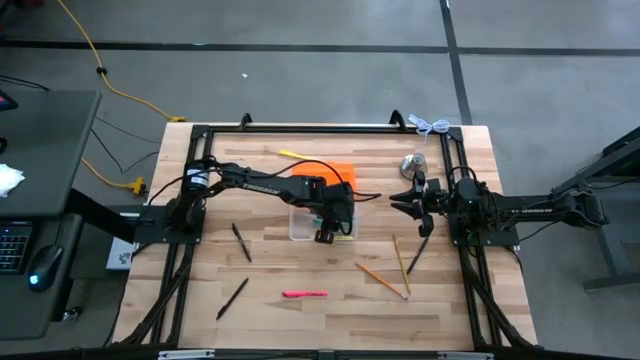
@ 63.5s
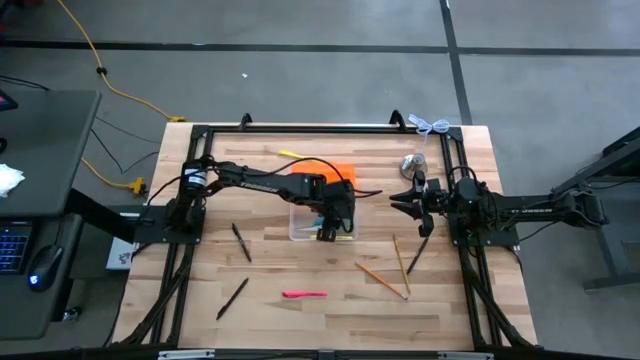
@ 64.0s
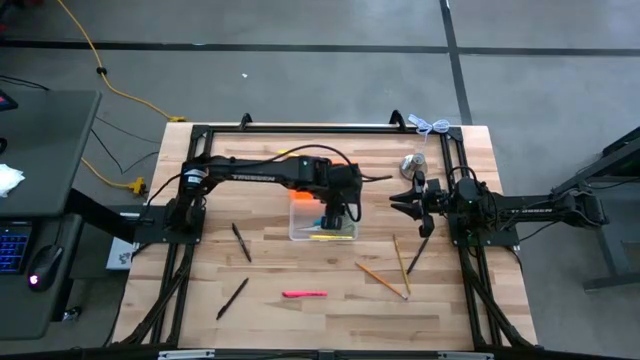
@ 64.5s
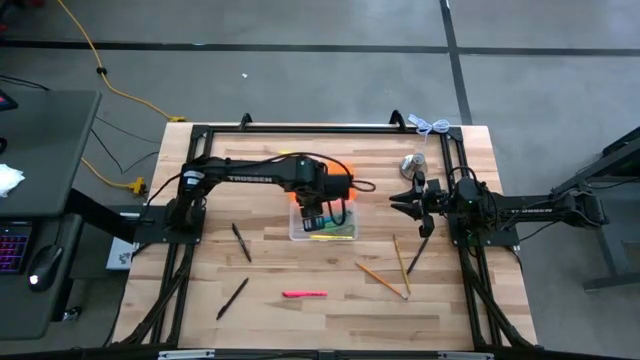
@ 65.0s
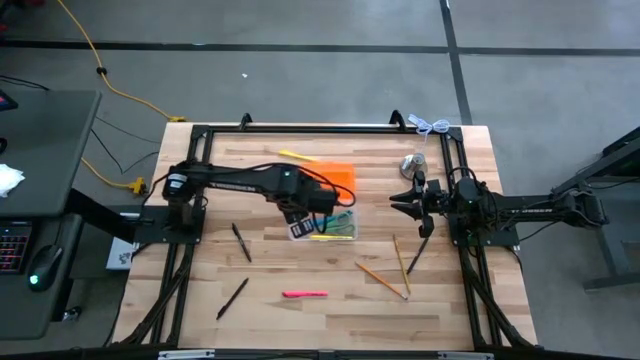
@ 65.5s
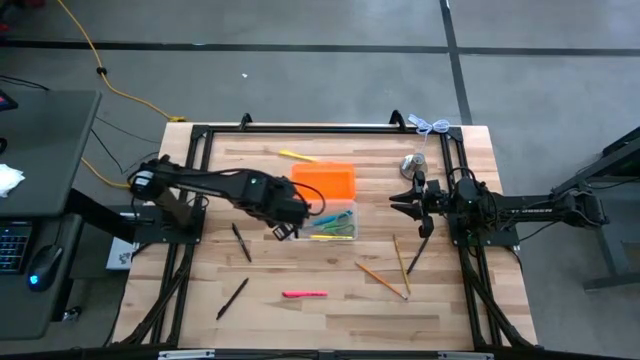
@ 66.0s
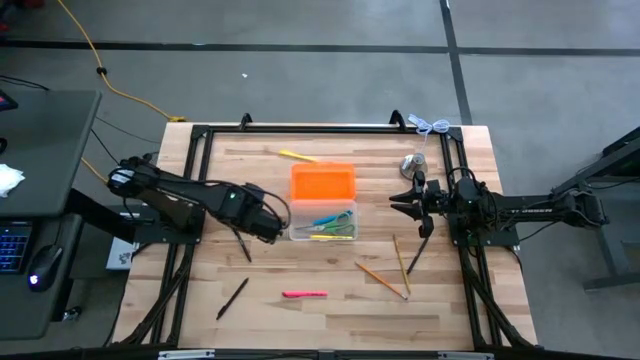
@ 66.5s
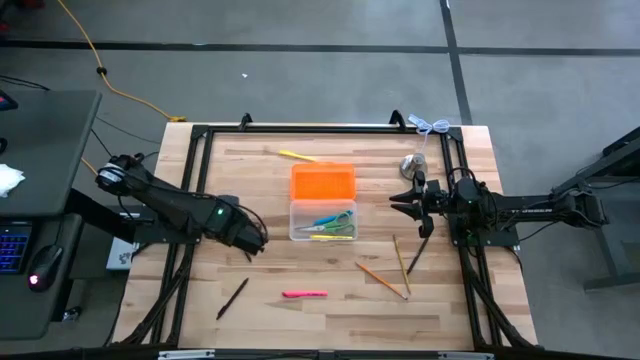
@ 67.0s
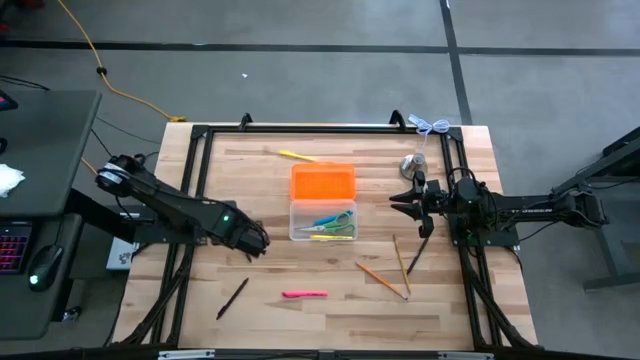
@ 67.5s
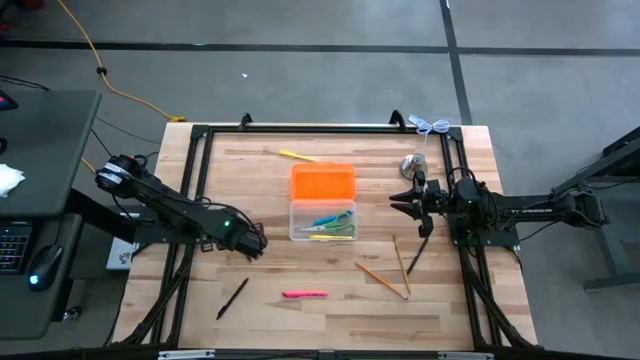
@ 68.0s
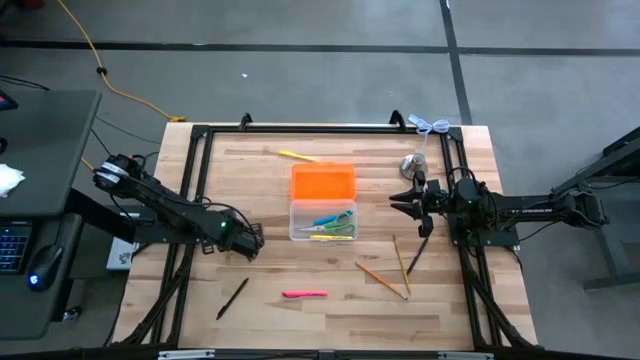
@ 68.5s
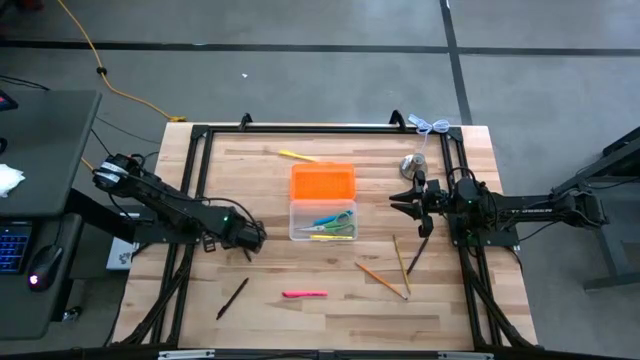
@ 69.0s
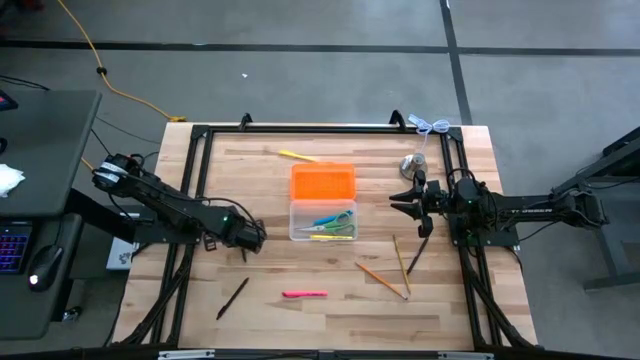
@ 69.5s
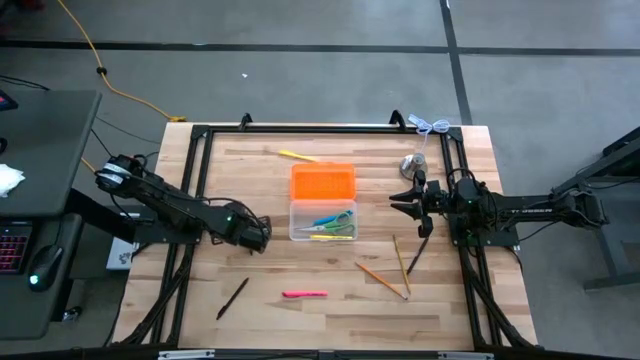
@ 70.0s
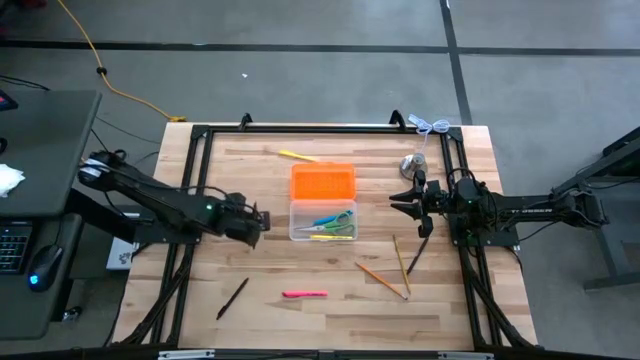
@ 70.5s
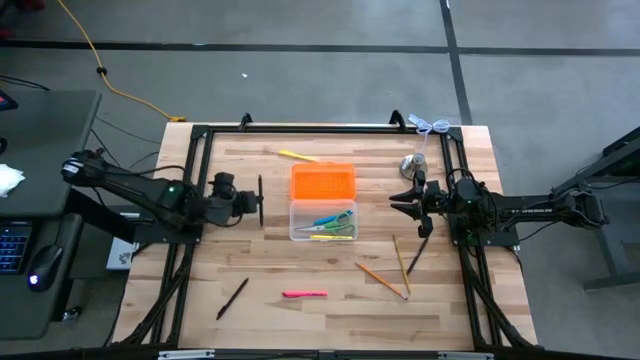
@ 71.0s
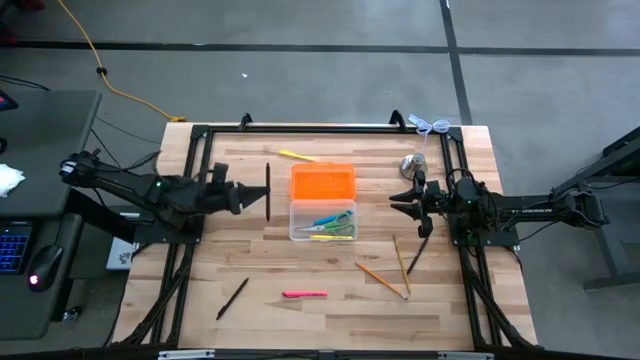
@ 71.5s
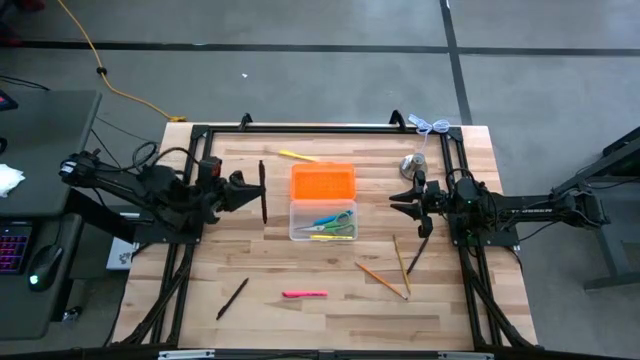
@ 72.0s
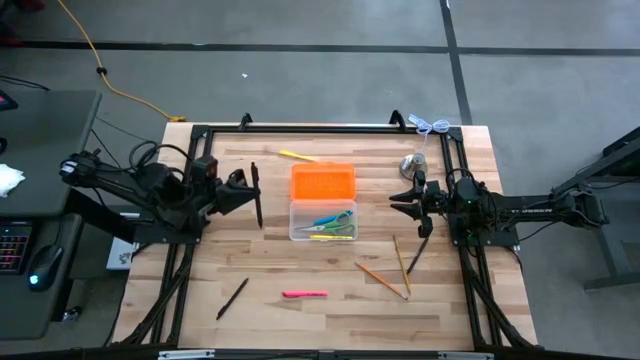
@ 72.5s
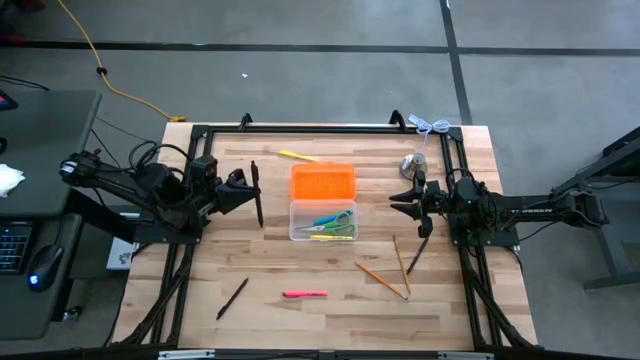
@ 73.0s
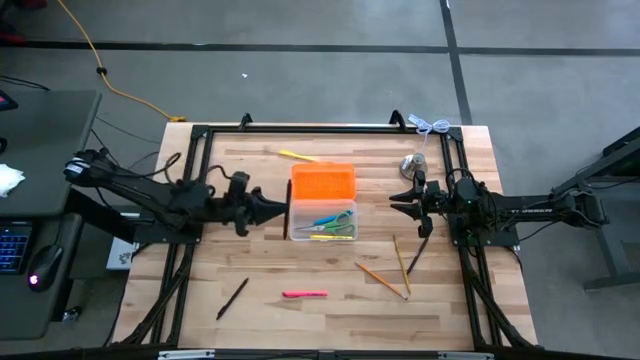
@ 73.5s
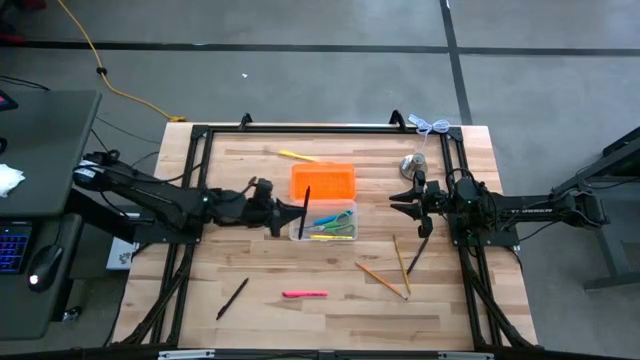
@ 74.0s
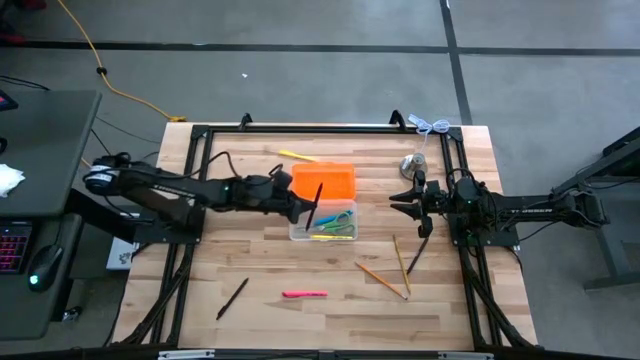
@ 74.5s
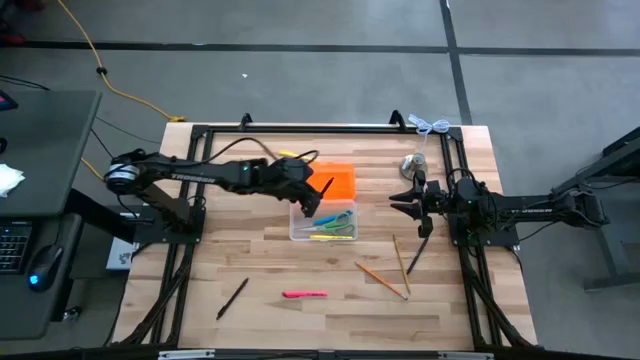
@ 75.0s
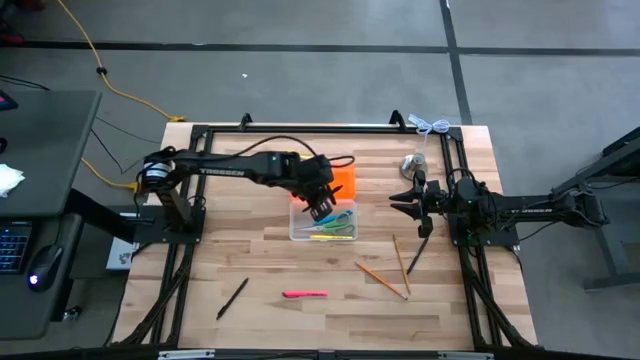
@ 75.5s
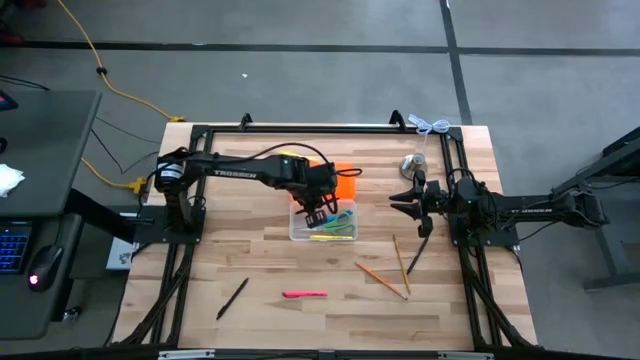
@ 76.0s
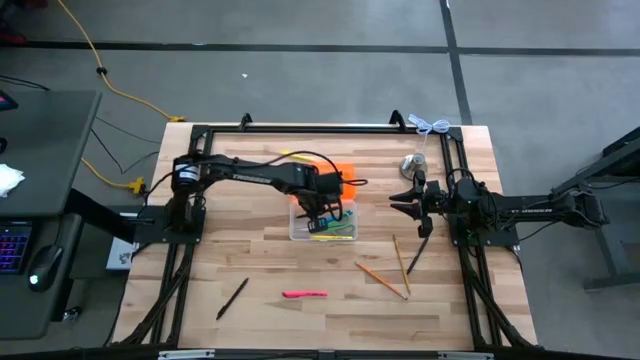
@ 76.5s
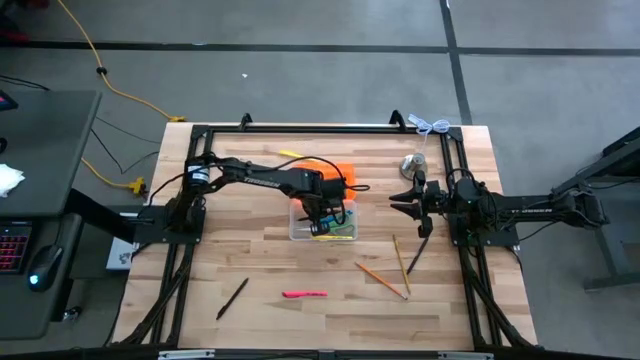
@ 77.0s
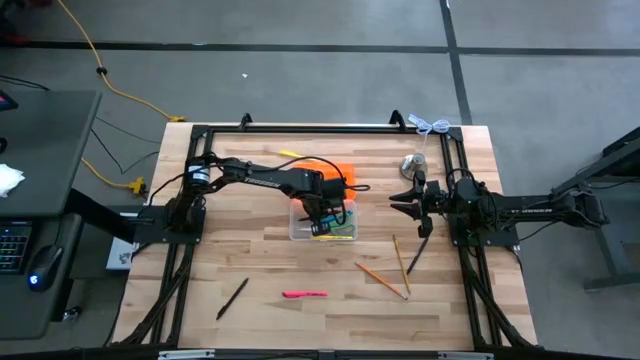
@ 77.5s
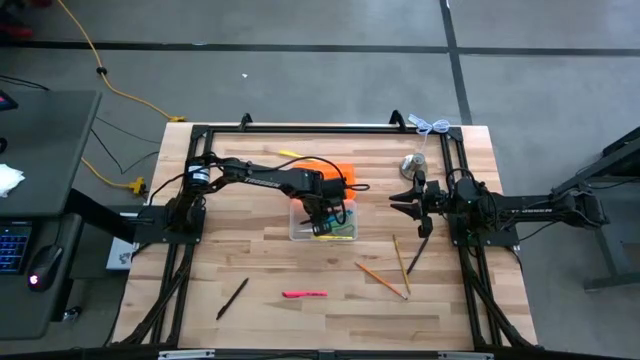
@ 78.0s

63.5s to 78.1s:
Task: Pick & place school supplies into a supply box
Put the top left black pen into the orange supply box

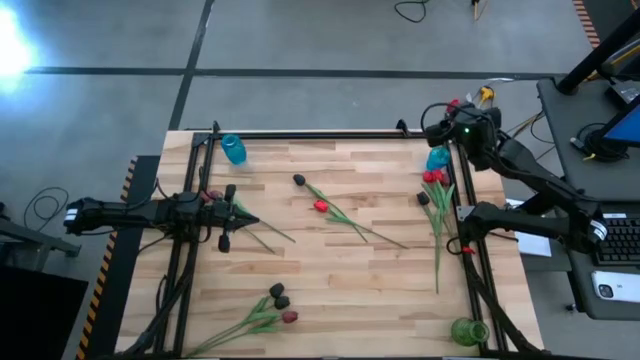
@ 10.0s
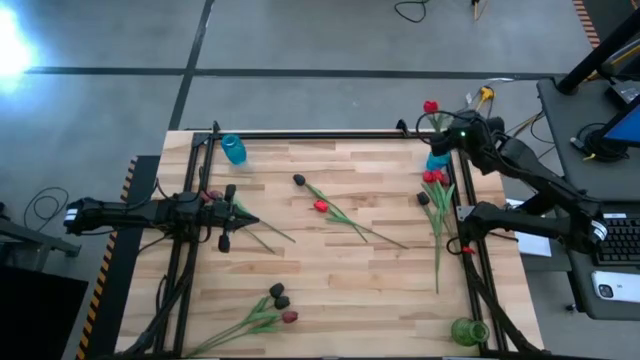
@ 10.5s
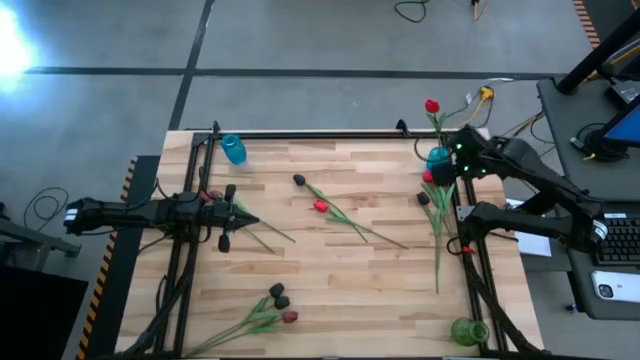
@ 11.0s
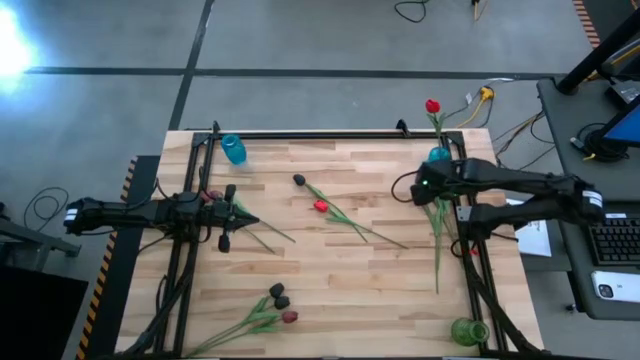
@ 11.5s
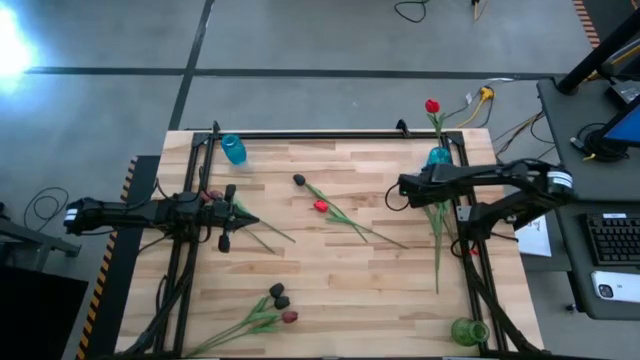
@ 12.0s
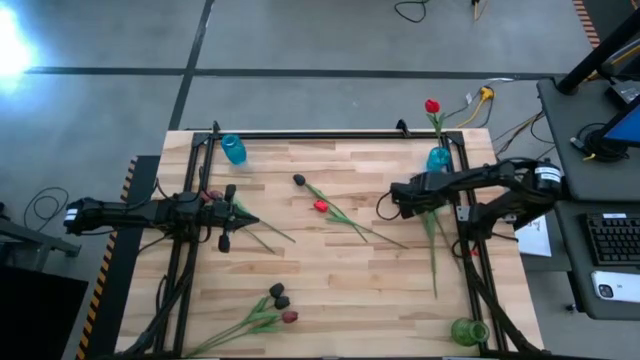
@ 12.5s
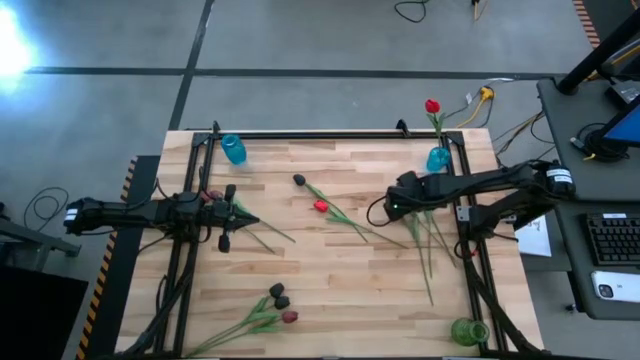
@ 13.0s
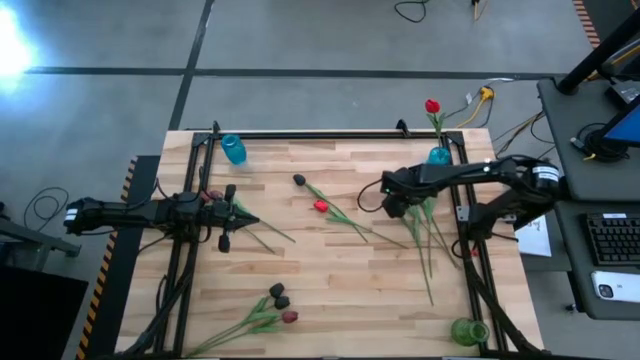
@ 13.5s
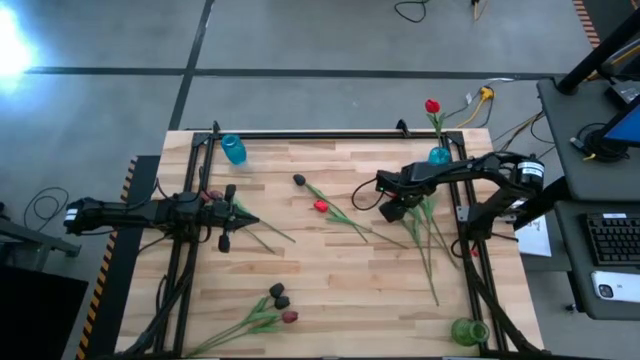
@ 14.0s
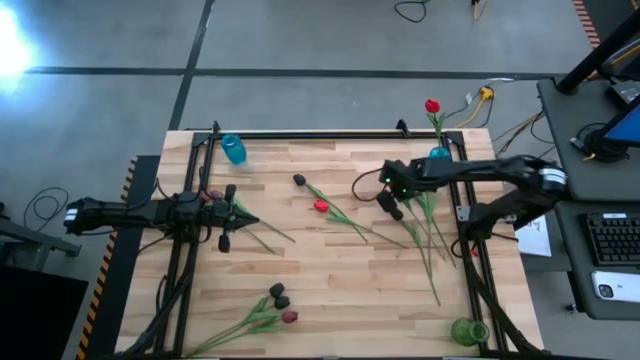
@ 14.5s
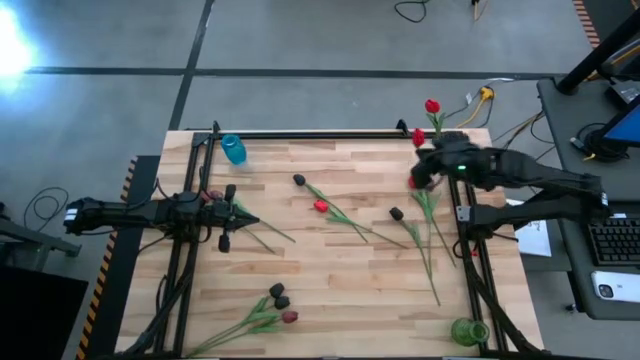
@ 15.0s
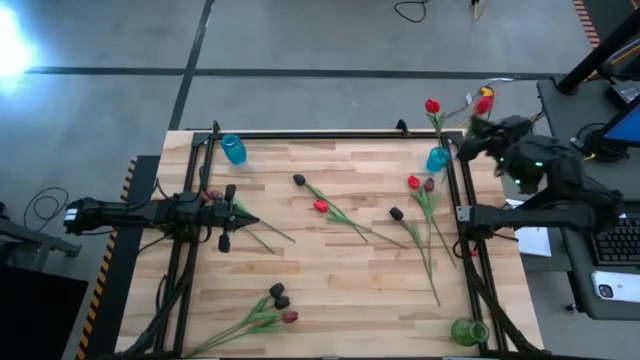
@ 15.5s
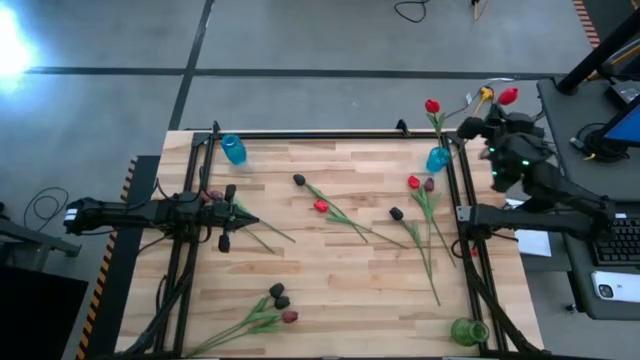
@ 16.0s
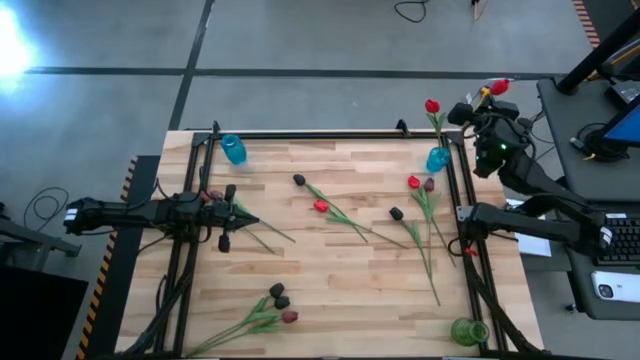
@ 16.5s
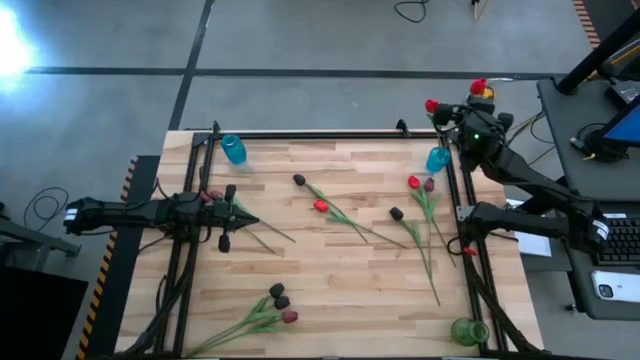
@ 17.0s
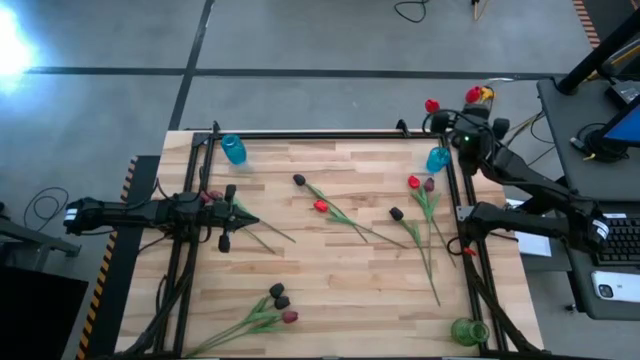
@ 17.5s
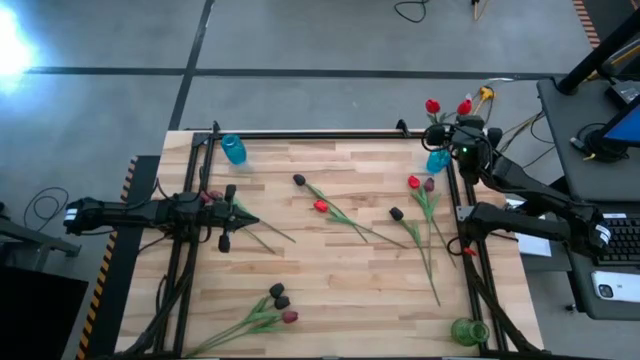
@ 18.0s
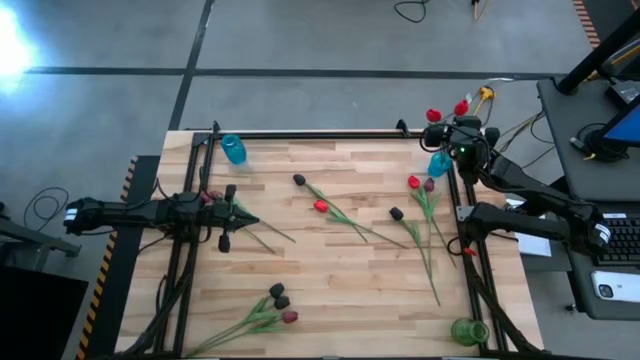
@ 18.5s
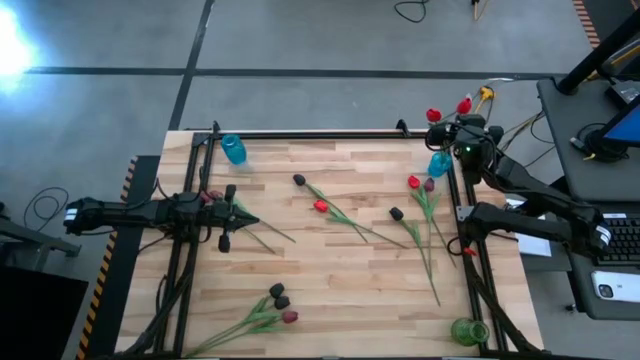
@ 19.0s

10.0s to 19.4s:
Task: Sort flowers into vase by color
Put the red tulip into the right blue vase
